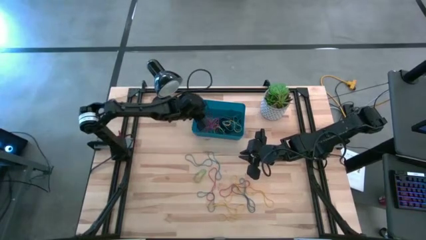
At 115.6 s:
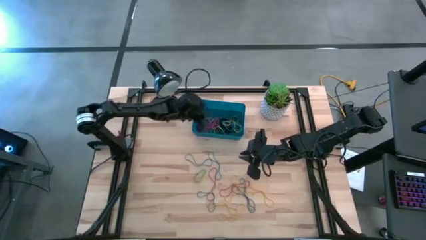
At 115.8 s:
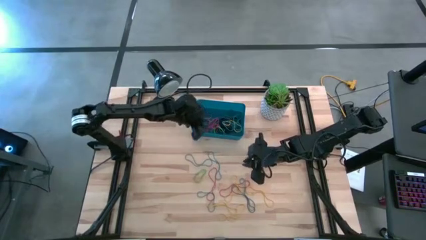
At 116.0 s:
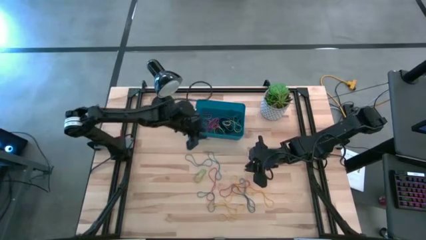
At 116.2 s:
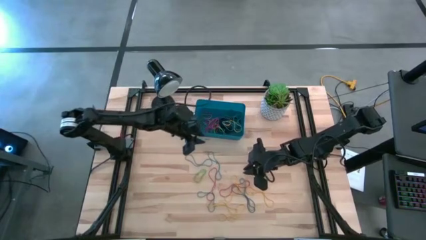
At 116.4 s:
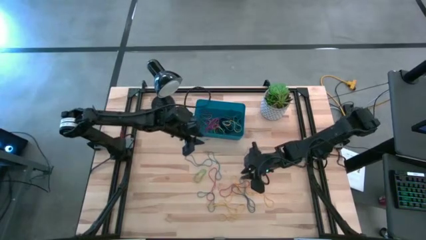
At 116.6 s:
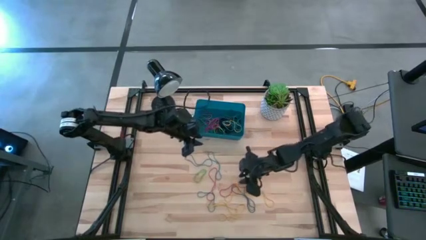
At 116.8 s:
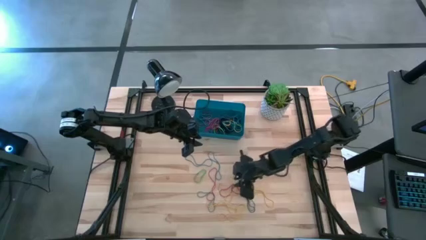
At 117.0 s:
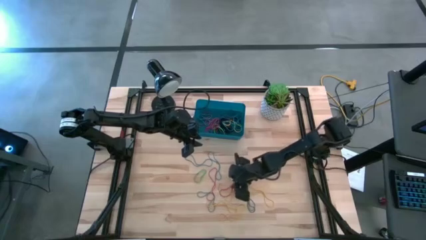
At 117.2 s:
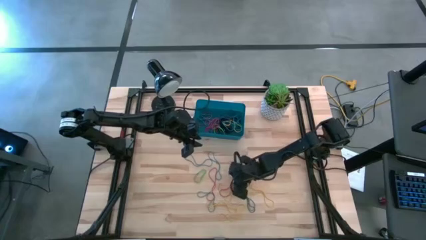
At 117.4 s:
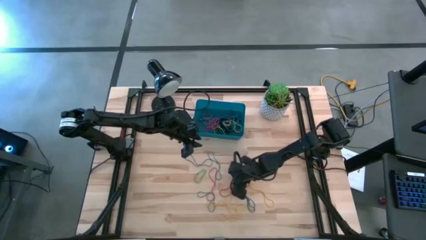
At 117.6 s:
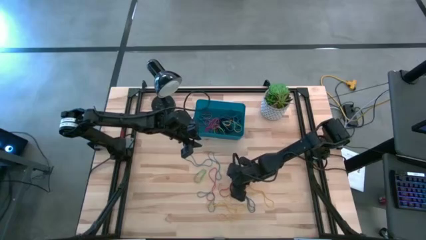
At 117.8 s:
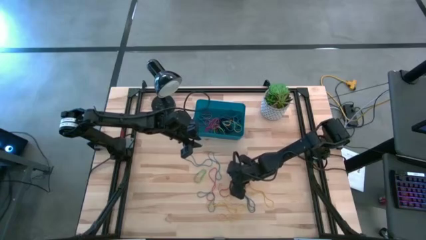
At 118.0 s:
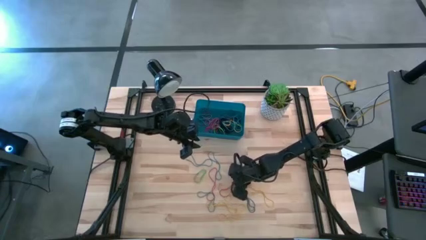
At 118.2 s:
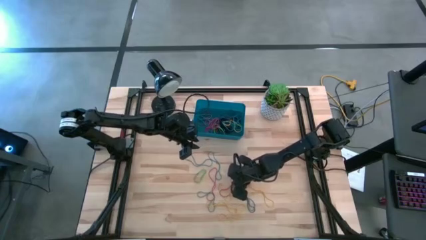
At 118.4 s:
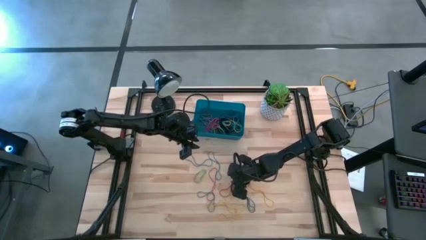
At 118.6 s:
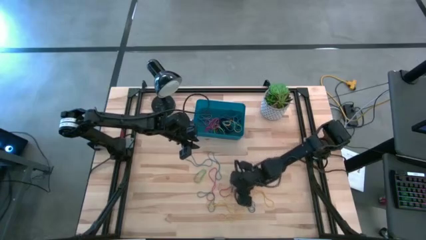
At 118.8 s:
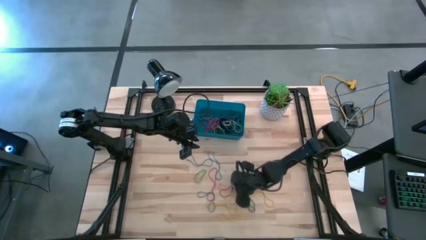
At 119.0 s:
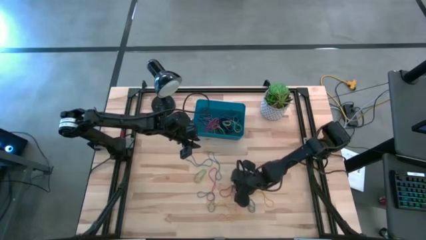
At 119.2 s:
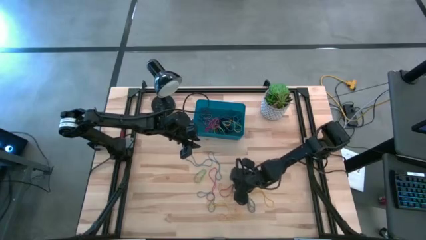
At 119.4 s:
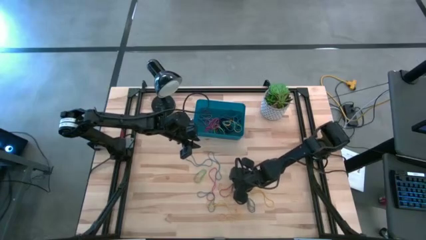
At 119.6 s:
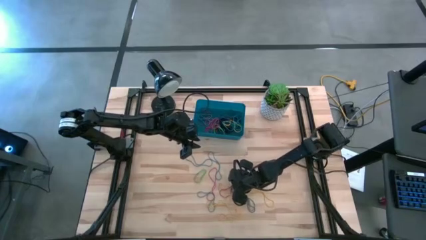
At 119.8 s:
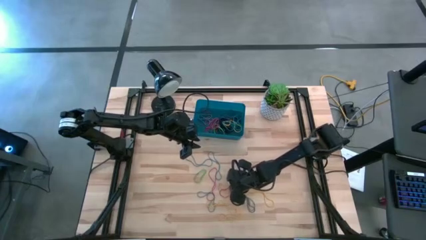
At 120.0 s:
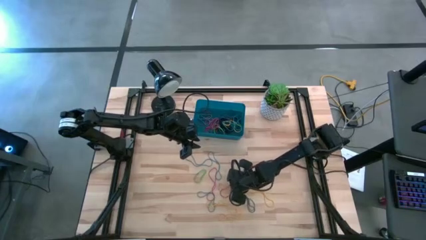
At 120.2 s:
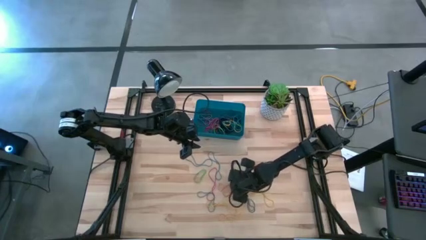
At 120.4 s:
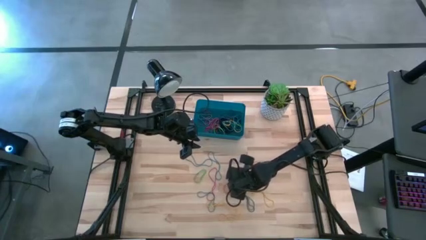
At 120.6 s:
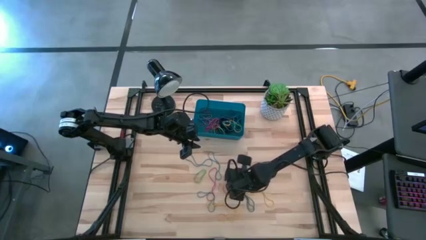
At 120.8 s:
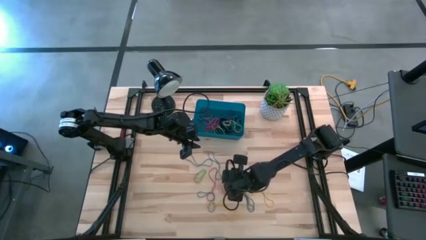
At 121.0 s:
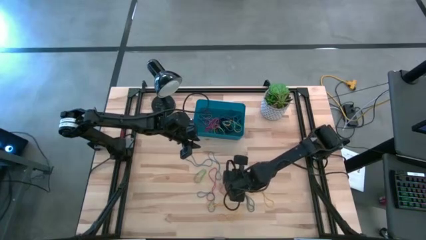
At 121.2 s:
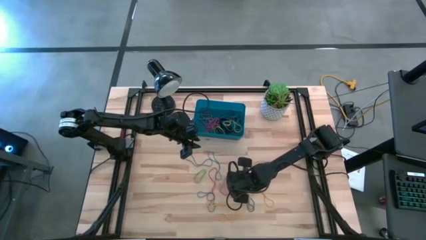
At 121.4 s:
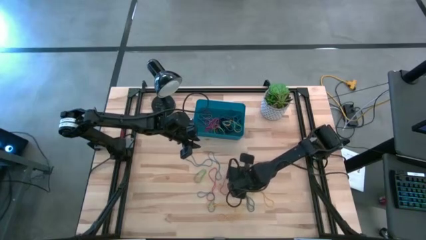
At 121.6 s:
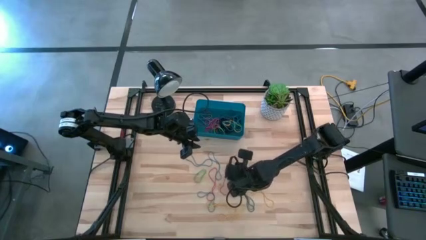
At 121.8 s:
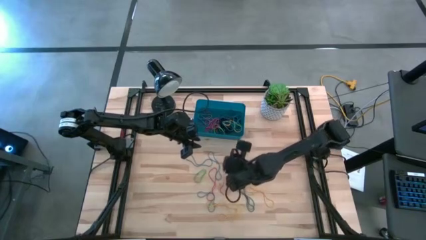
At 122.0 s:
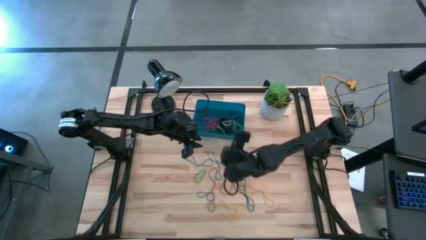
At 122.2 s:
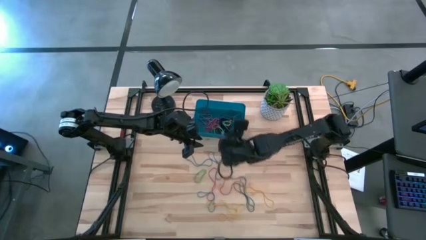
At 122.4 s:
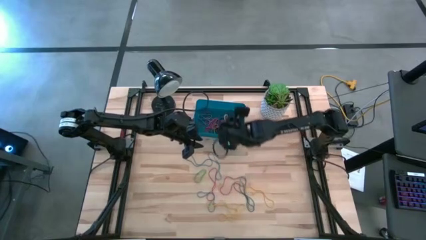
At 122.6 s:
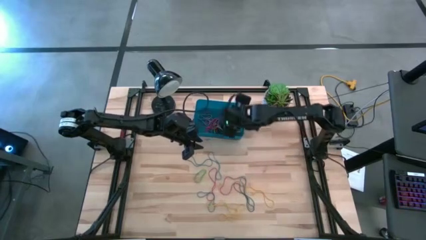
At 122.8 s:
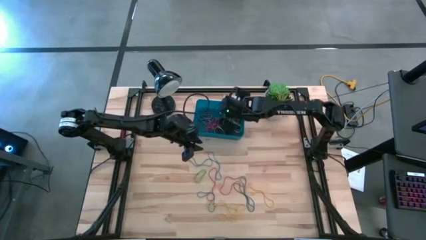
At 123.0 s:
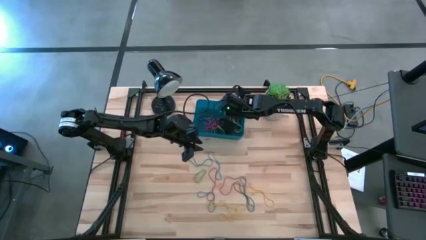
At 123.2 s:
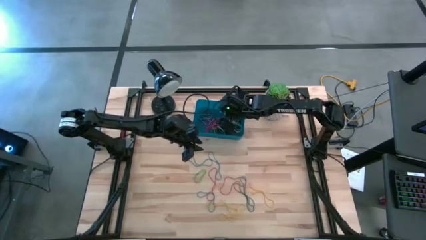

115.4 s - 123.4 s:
Task: Pick and place rubber bands into bin
Put the yellow rubber band into the blue bin

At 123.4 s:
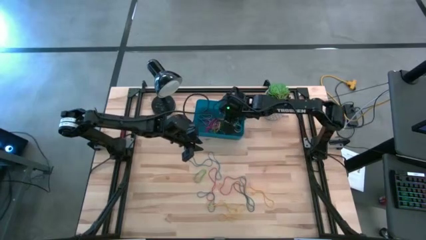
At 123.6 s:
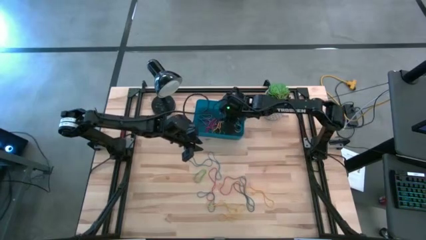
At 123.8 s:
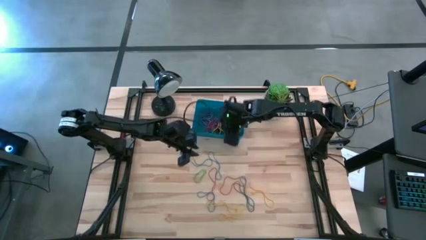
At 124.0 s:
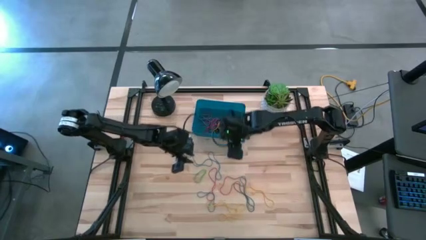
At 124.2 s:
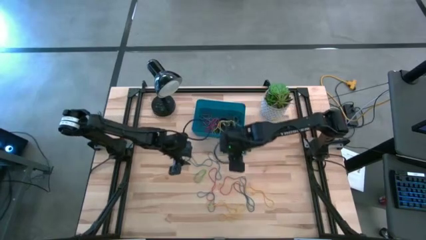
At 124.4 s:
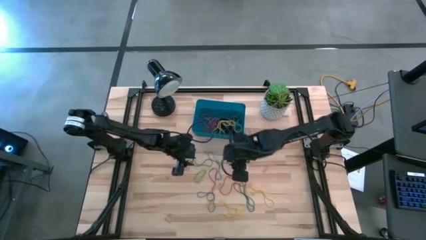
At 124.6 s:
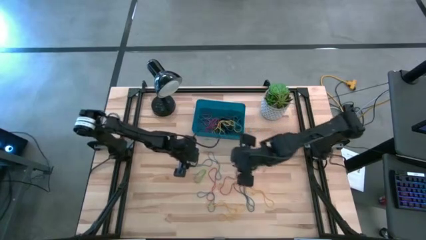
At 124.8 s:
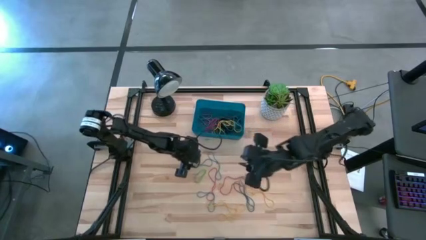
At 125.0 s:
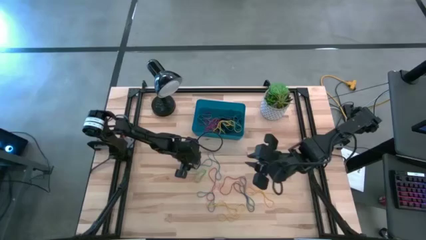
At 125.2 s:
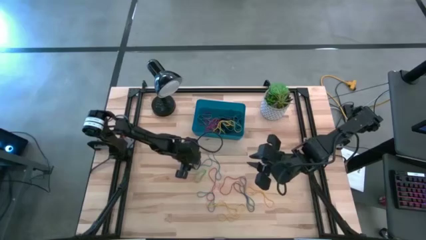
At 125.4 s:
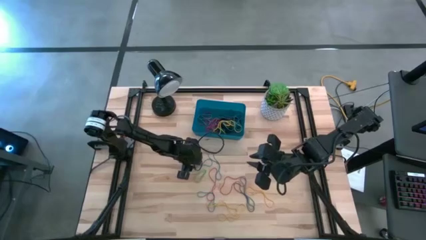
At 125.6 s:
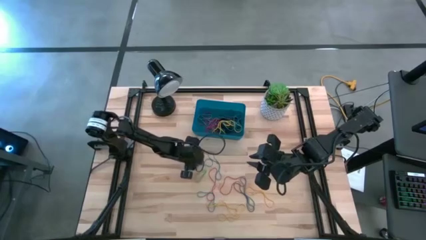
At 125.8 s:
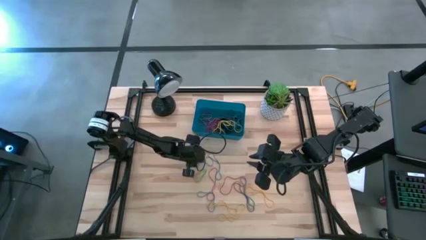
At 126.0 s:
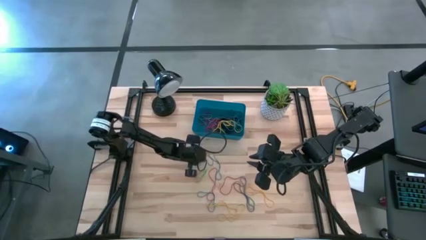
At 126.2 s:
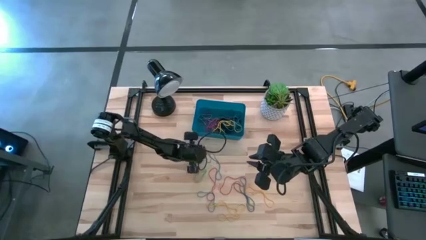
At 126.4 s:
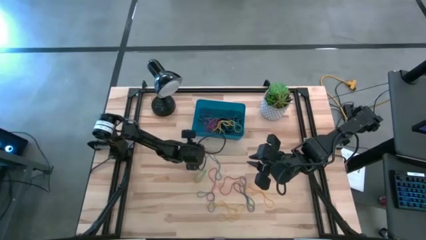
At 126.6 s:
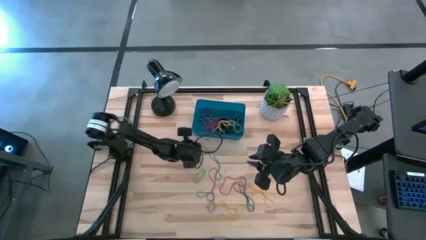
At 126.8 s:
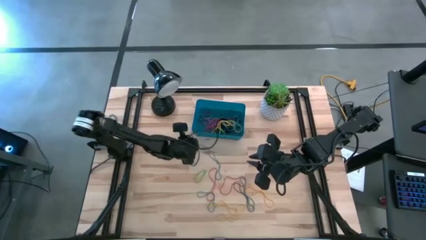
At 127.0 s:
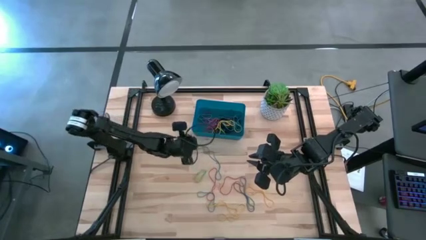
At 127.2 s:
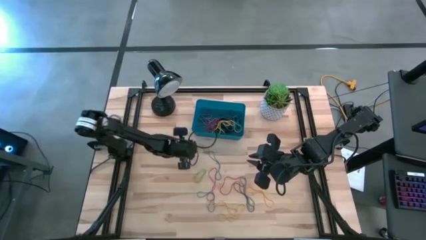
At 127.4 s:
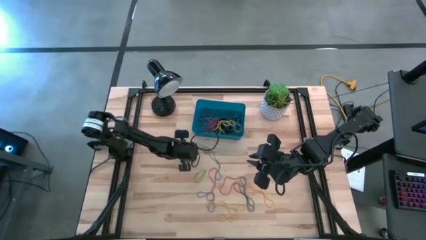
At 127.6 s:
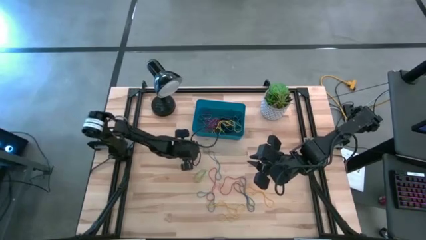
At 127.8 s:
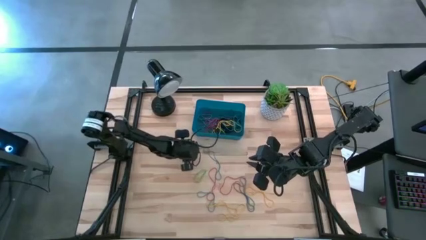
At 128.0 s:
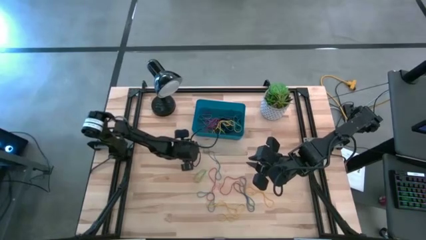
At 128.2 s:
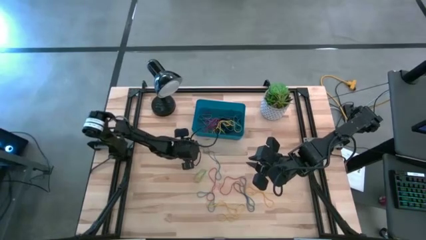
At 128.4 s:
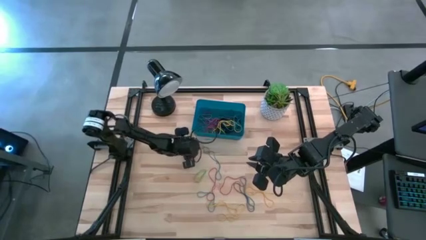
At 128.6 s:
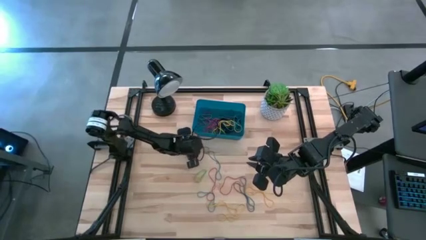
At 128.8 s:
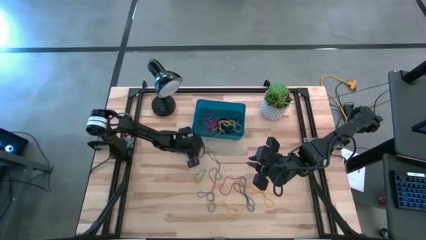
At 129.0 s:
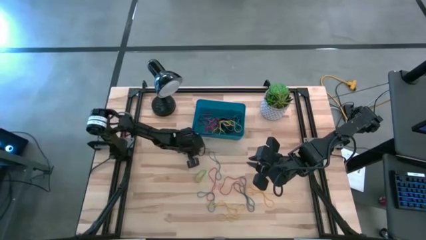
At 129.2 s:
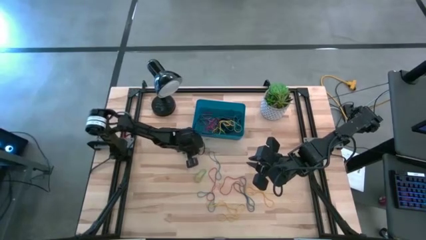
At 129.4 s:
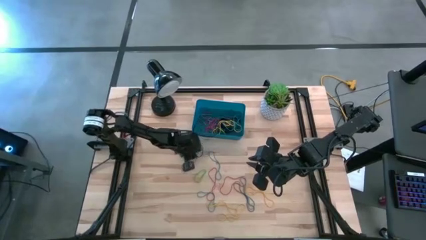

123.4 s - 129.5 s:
Put the blue rubber band into the blue bin
